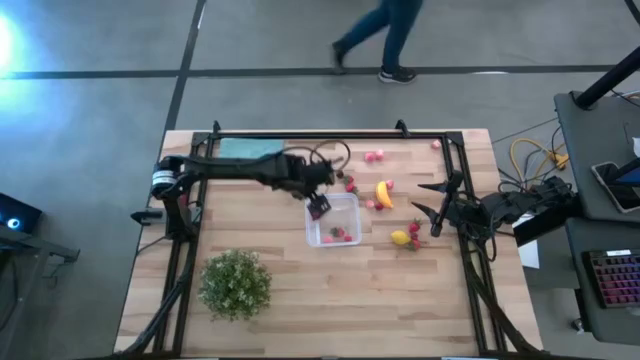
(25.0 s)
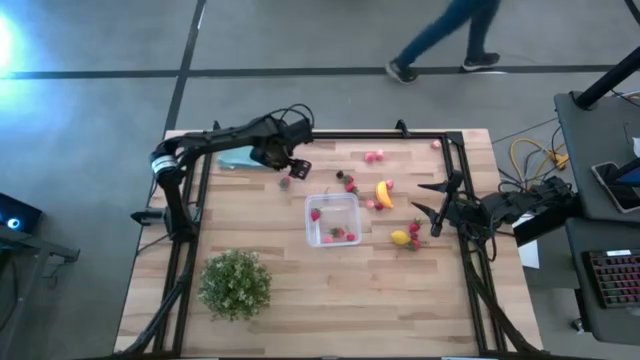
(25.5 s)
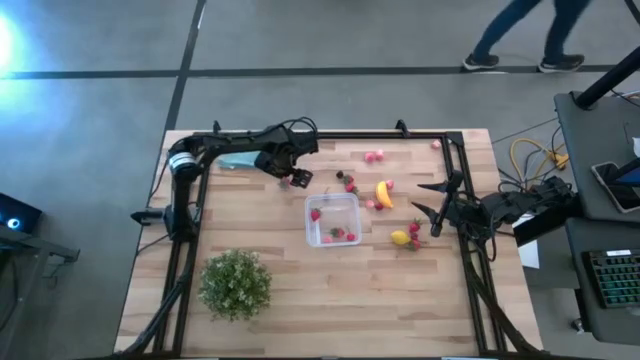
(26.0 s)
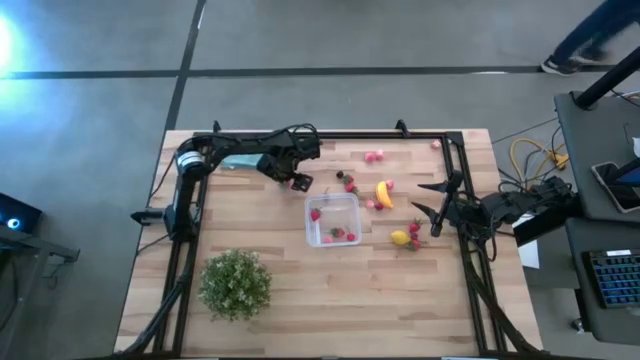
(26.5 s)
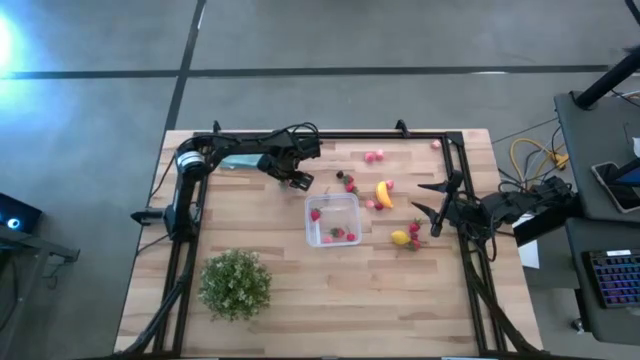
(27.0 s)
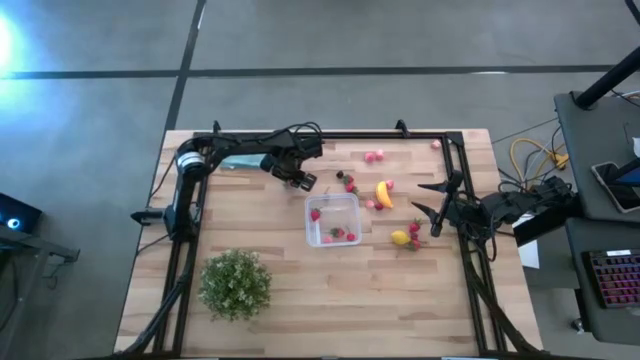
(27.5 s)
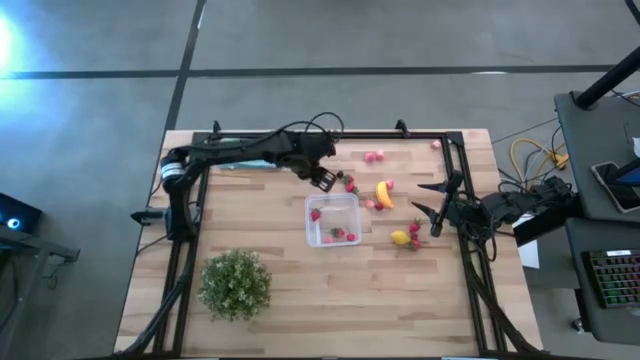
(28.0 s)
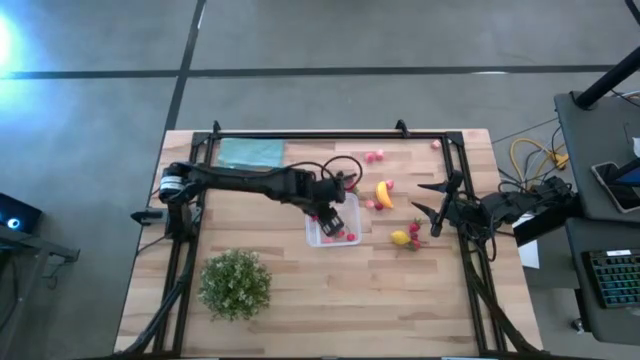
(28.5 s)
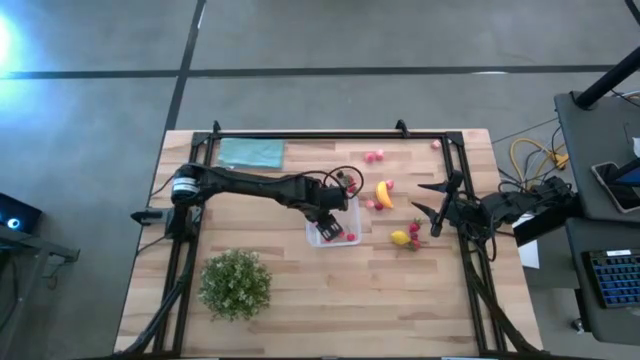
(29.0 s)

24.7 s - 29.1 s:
Task: Pick and placing Produce into tupperware
Put the strawberry into the transparent container

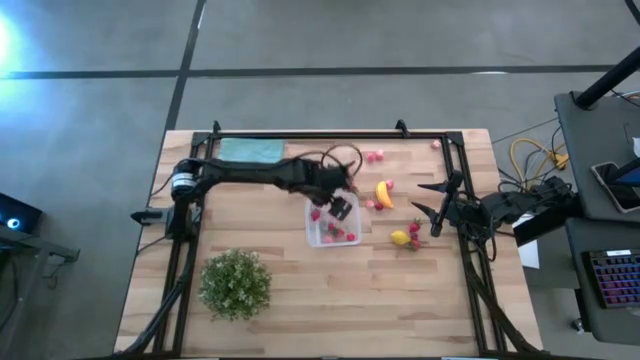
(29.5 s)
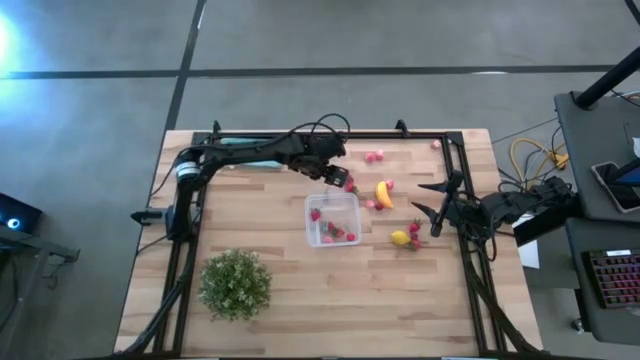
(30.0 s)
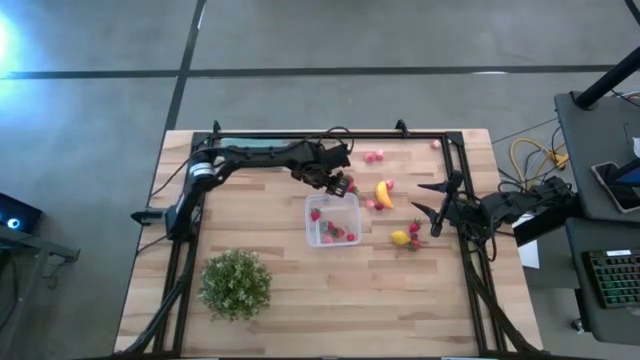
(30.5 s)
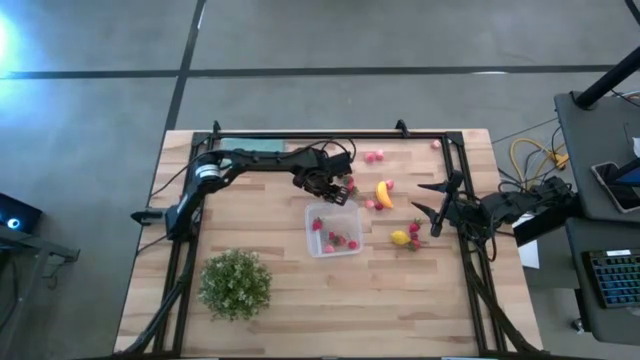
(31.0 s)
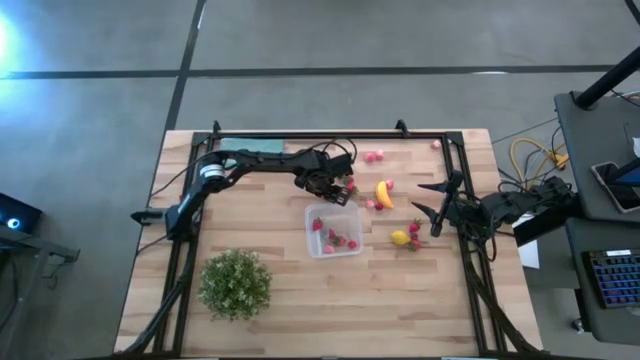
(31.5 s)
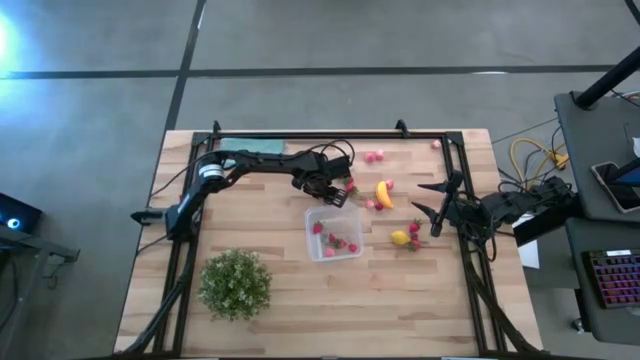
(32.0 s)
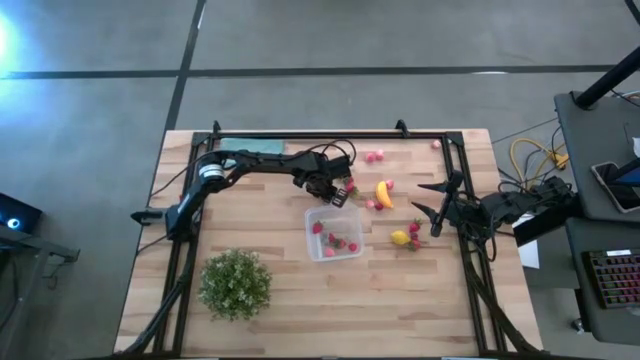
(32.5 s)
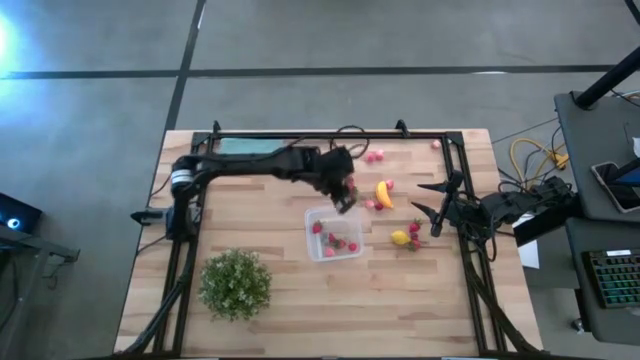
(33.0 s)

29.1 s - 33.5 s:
Put the cherry into the transparent container

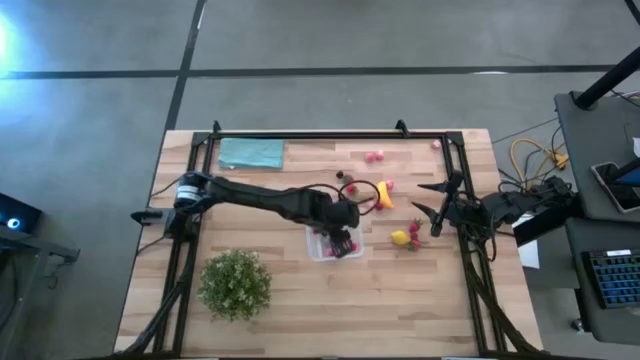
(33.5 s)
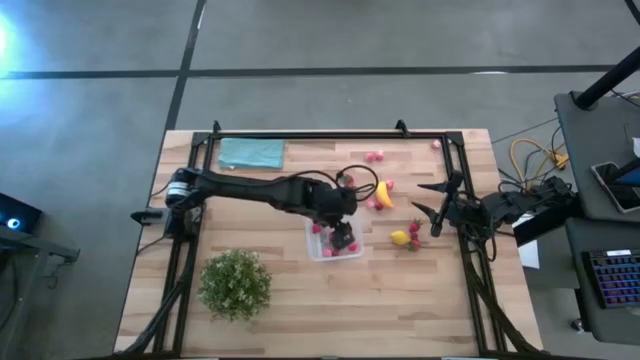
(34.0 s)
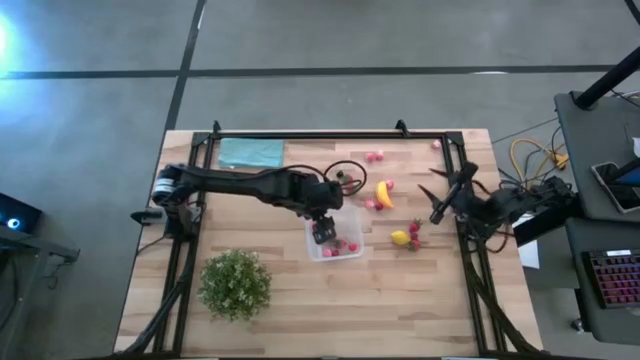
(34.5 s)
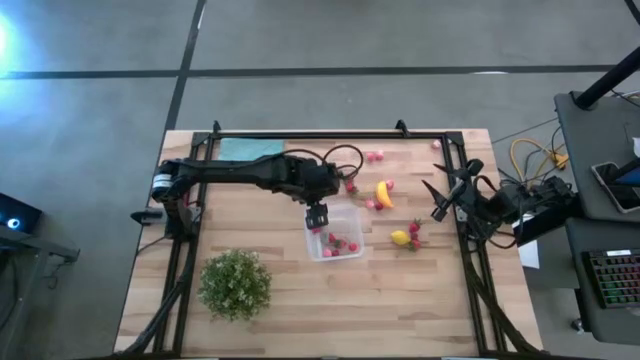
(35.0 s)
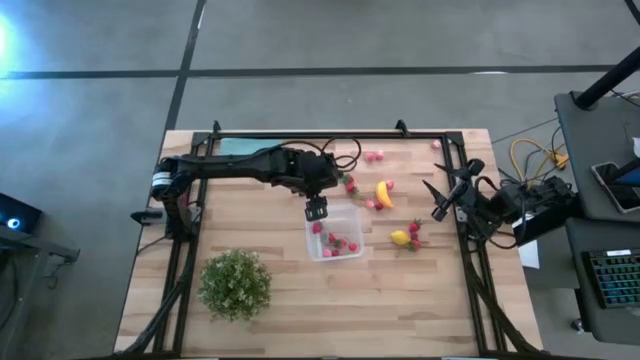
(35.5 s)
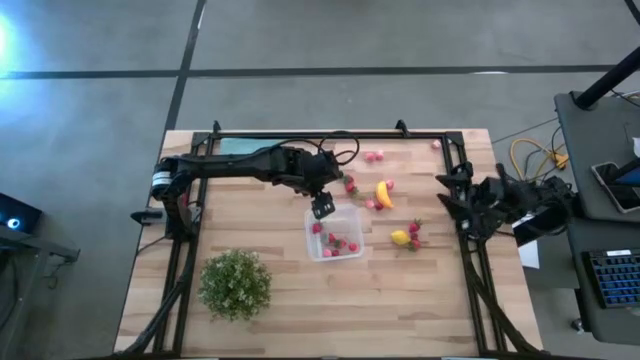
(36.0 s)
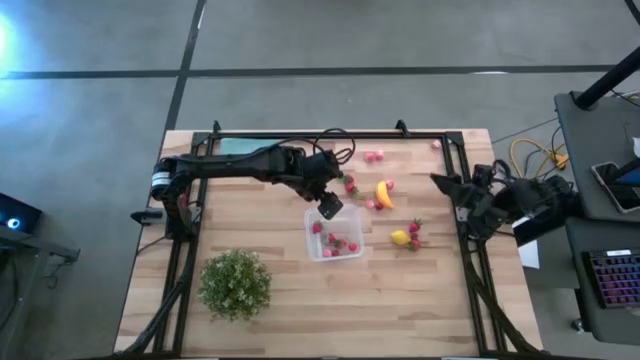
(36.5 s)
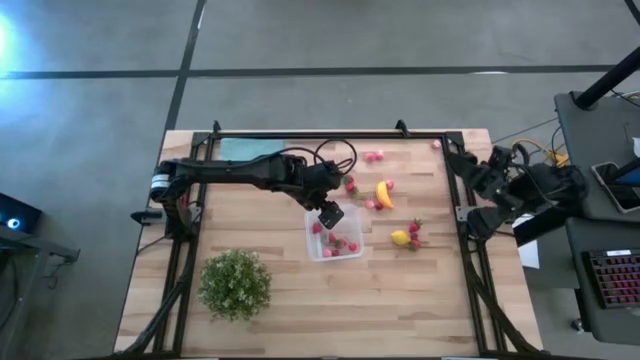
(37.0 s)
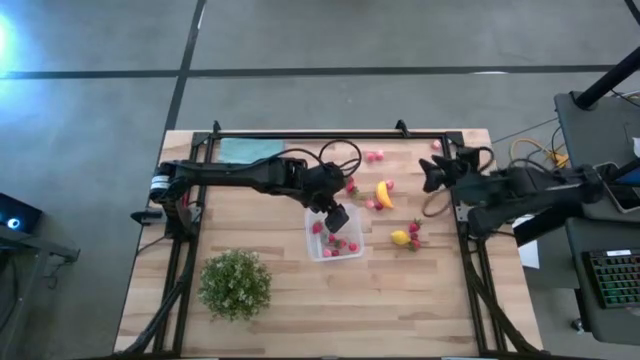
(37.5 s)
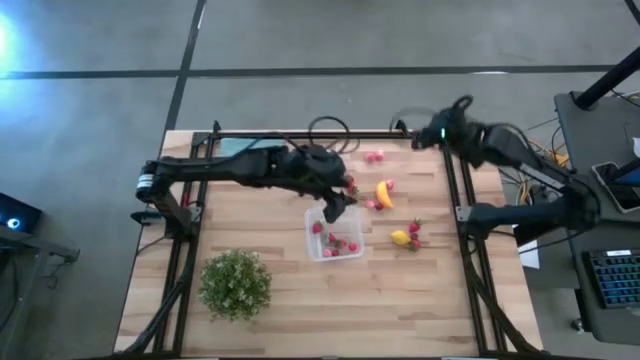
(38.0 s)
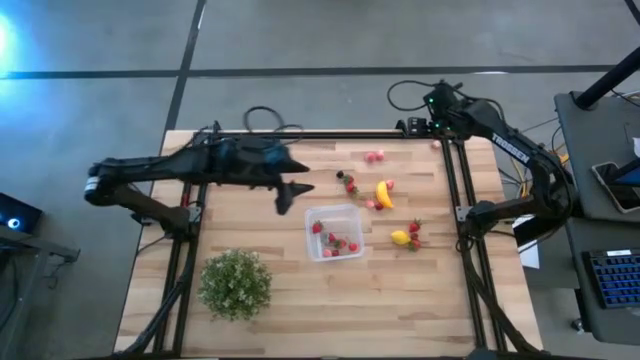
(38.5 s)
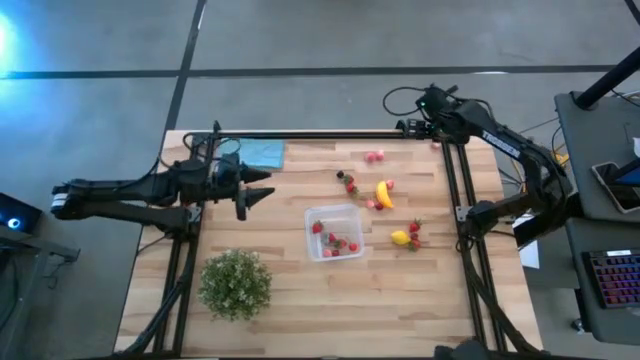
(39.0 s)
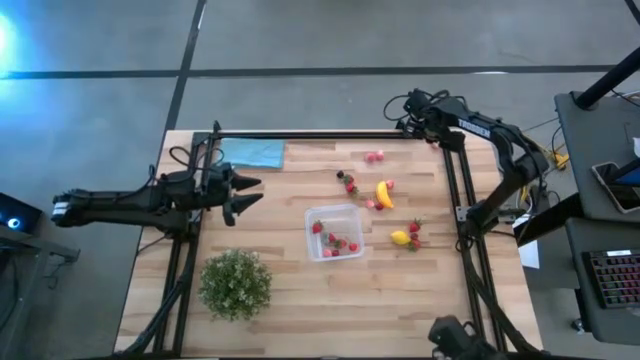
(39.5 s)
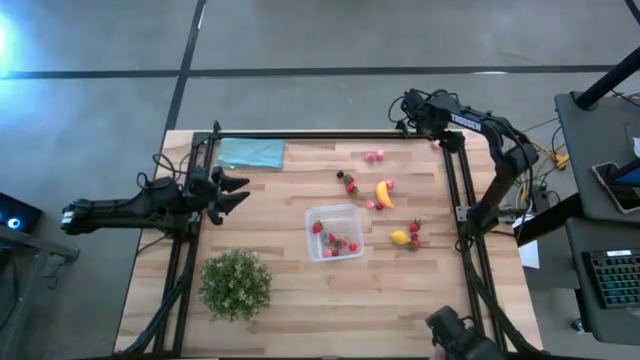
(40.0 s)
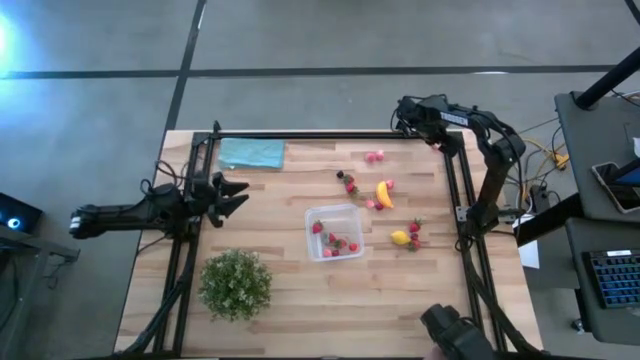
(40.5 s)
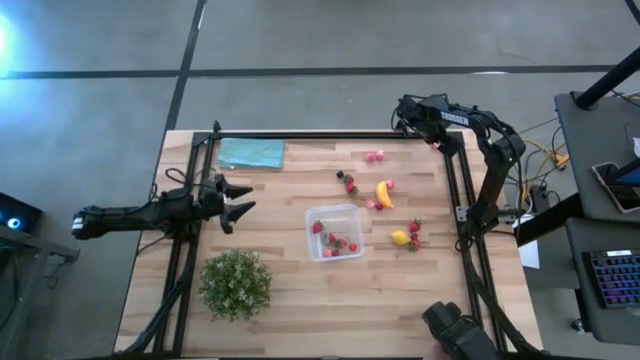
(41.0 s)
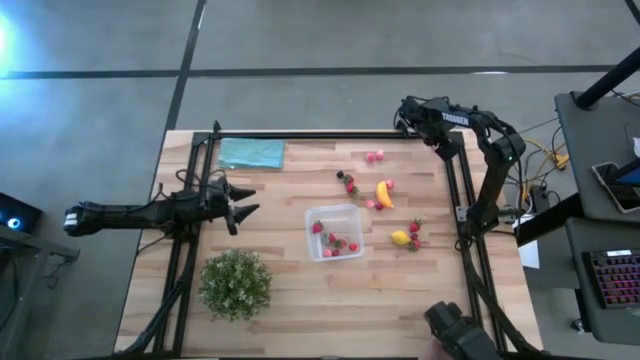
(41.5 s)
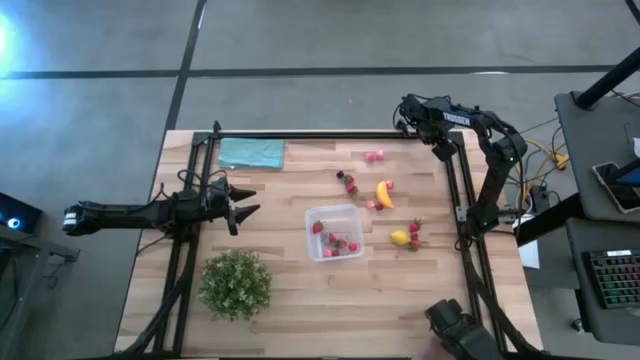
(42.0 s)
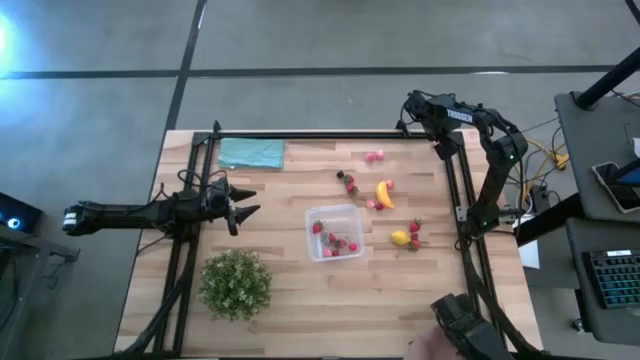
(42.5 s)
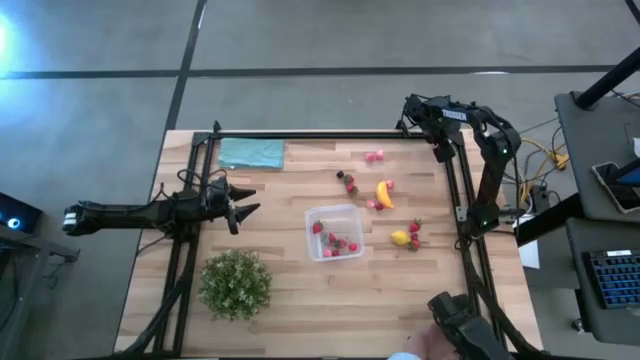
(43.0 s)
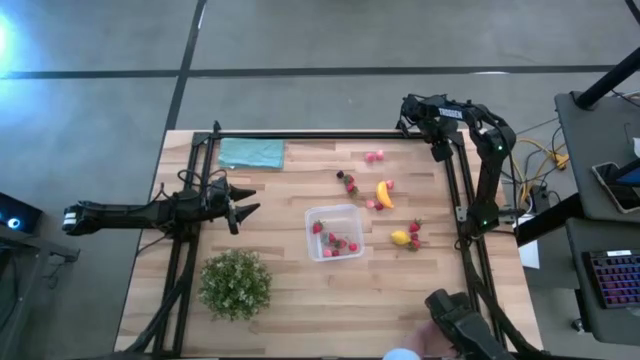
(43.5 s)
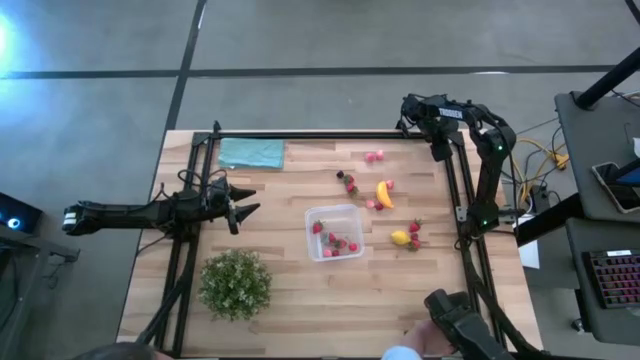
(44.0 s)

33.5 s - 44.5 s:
Put the peach into the transparent container

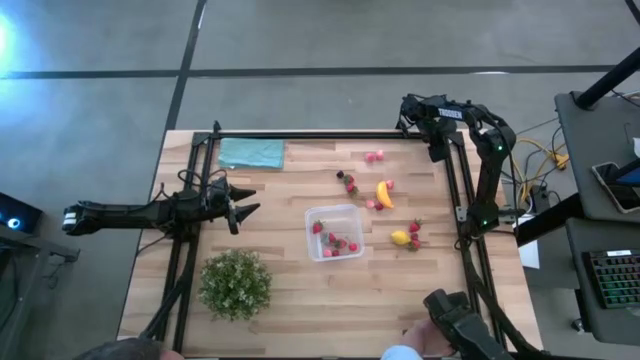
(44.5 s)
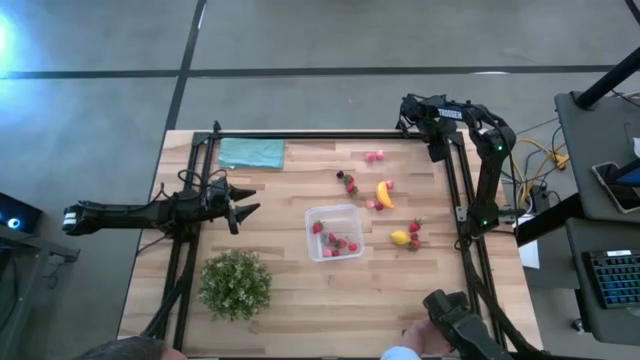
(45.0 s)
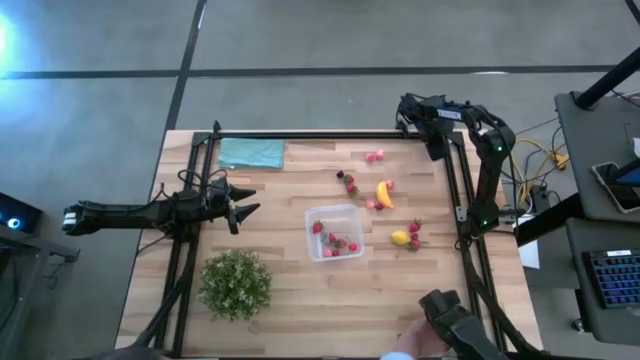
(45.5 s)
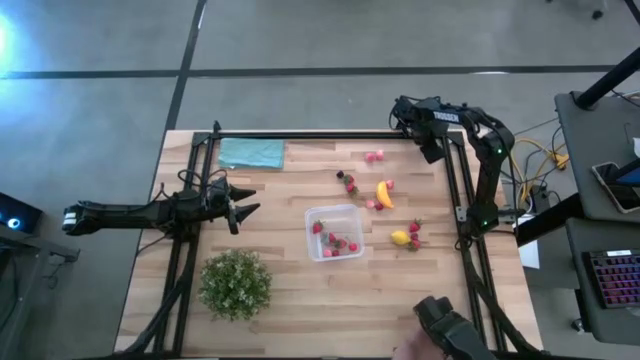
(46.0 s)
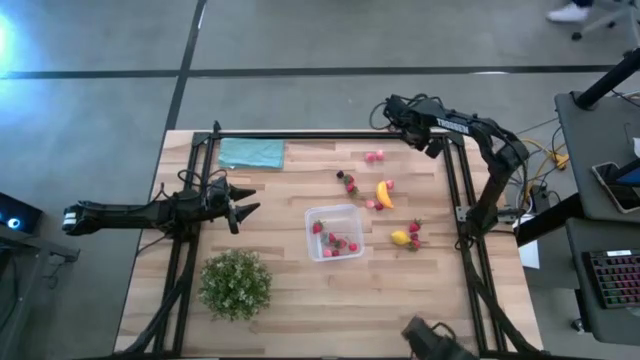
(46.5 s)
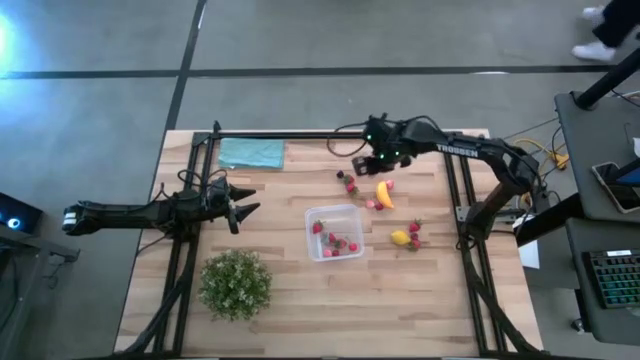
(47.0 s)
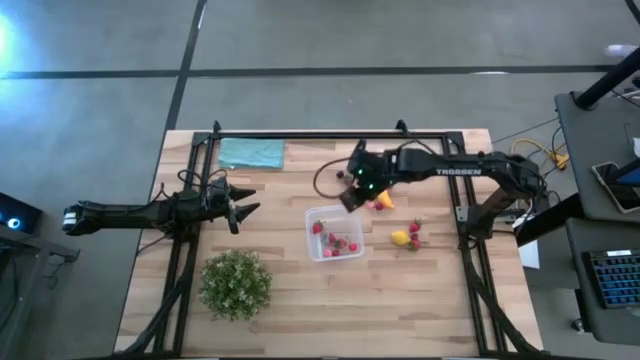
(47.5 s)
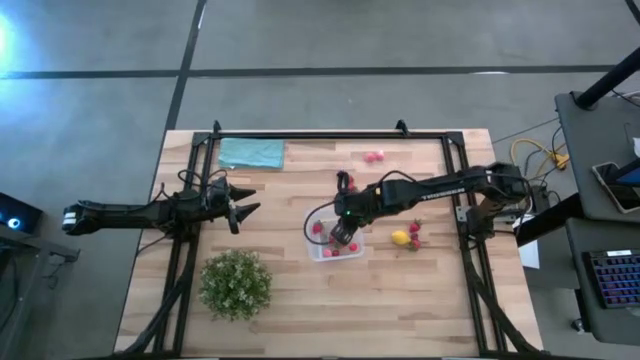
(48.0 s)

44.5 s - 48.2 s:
Put the peach into the transparent container
